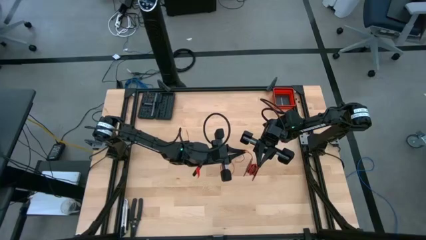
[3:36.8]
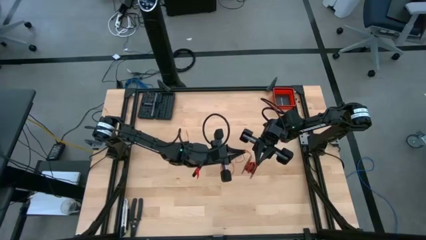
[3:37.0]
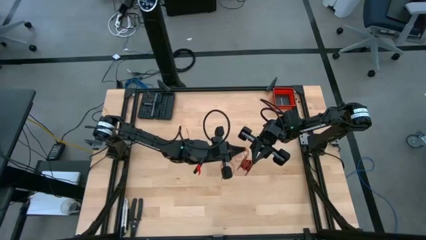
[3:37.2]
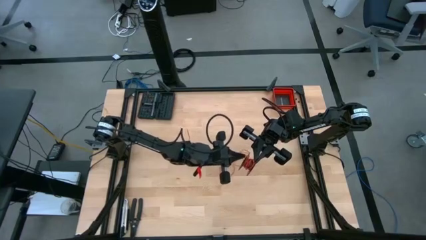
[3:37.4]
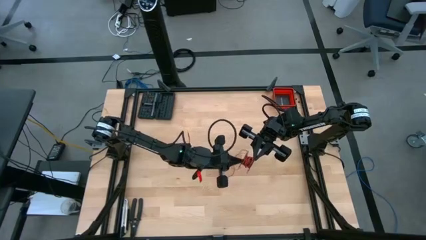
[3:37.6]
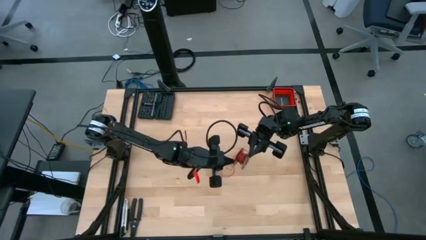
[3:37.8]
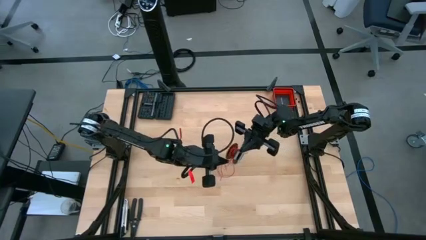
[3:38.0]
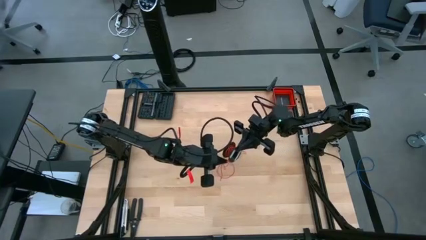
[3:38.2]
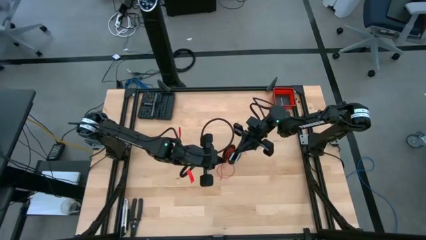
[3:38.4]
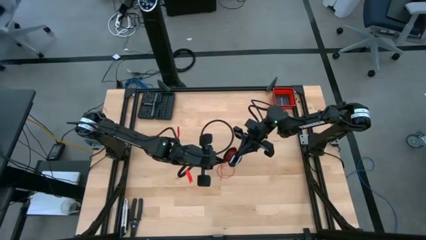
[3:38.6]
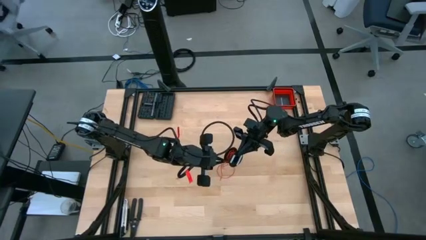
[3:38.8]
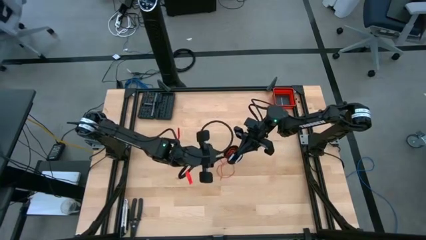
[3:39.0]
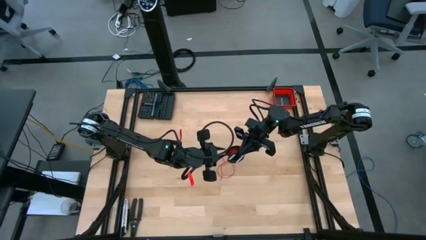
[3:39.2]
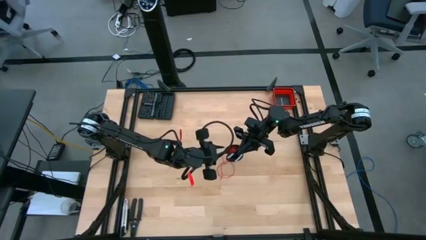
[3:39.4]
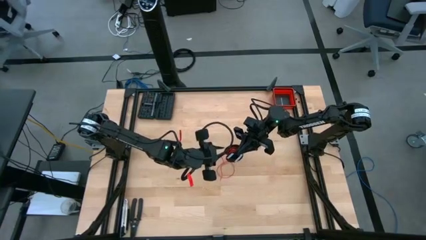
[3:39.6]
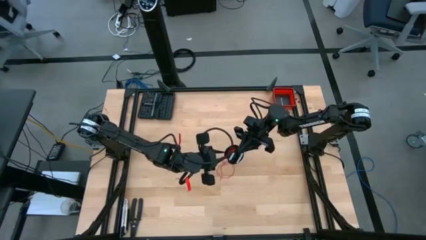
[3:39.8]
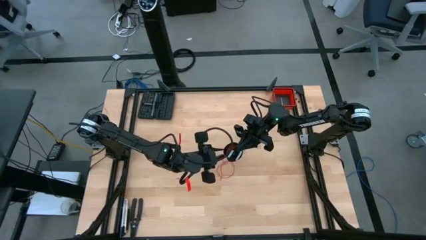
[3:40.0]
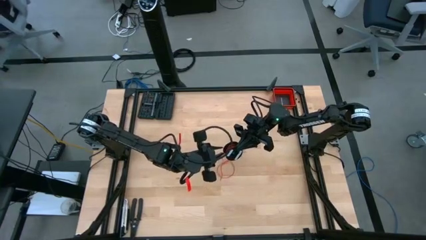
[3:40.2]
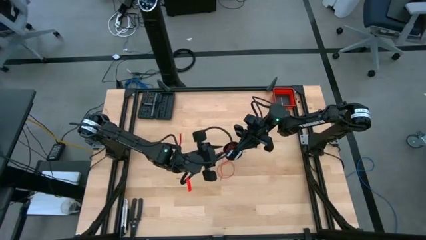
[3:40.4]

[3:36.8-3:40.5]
Task: Coil cords
Coil the red wire on the black spool

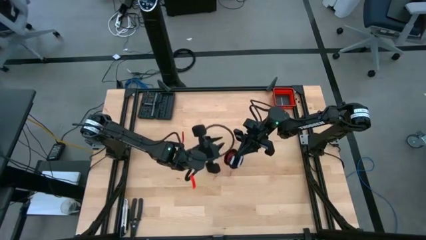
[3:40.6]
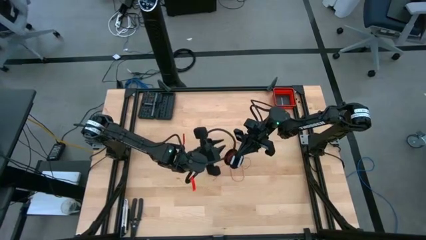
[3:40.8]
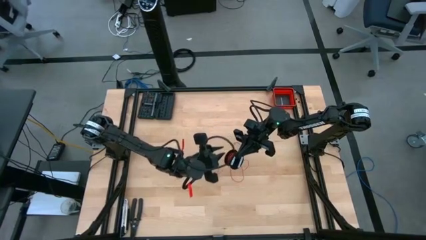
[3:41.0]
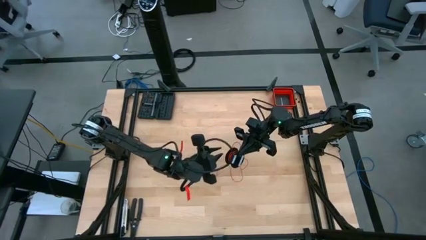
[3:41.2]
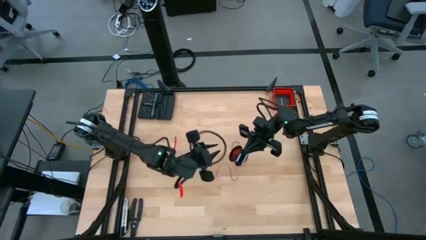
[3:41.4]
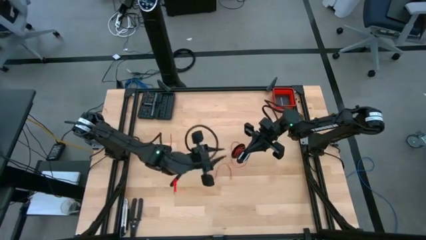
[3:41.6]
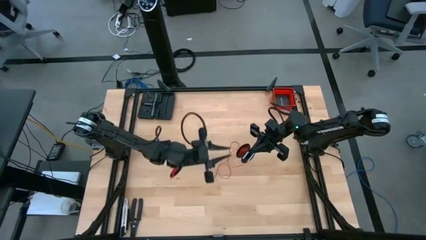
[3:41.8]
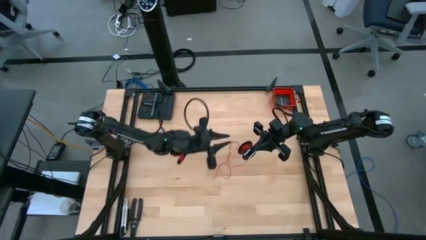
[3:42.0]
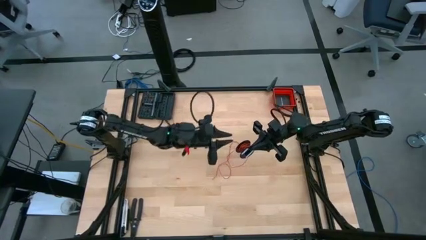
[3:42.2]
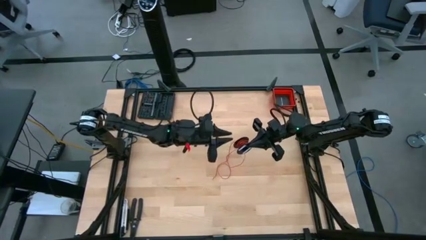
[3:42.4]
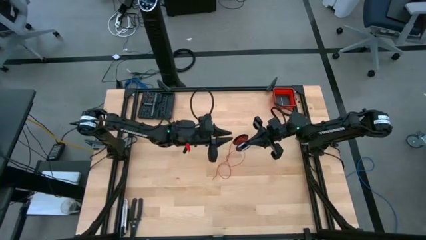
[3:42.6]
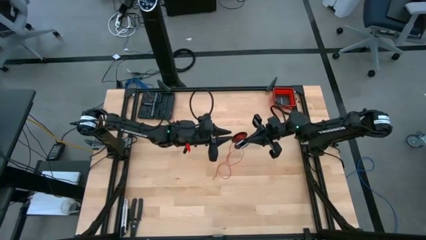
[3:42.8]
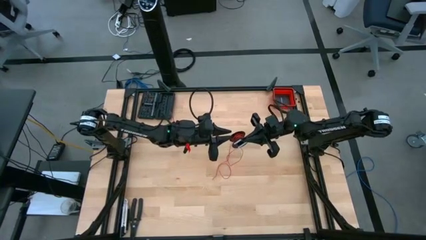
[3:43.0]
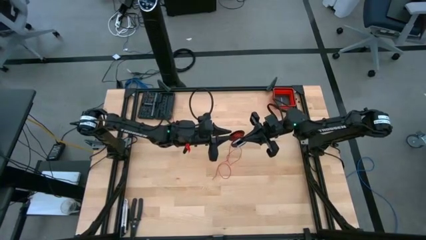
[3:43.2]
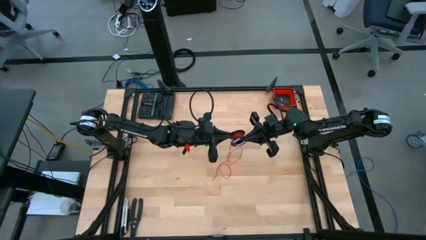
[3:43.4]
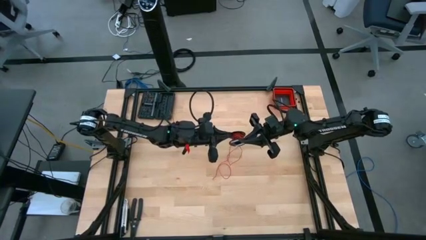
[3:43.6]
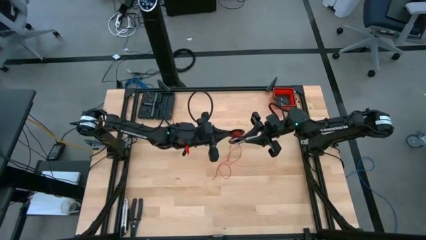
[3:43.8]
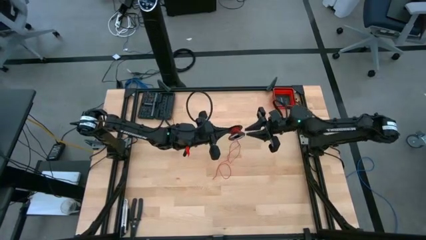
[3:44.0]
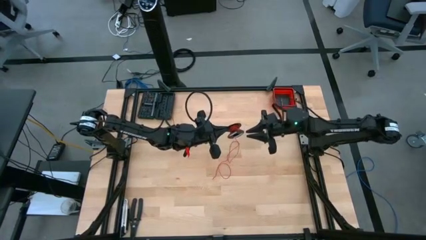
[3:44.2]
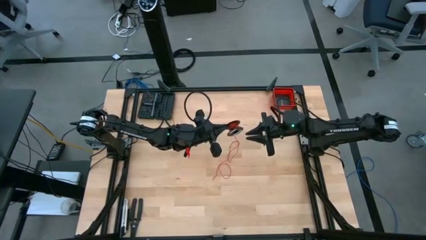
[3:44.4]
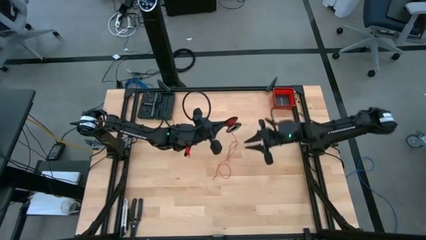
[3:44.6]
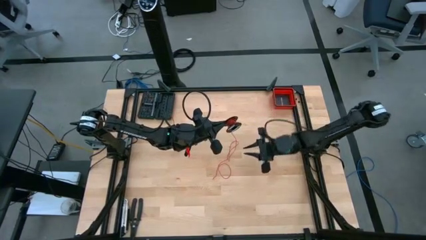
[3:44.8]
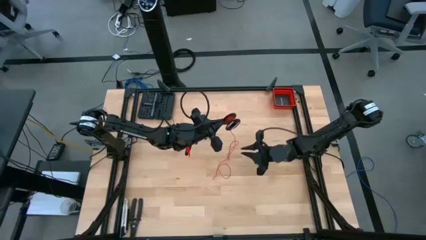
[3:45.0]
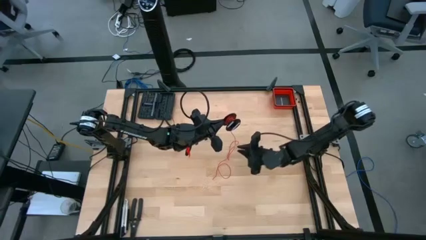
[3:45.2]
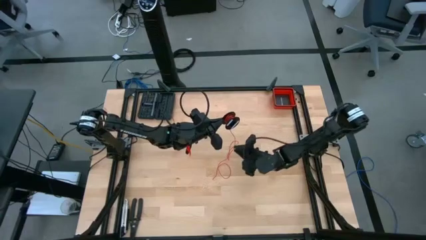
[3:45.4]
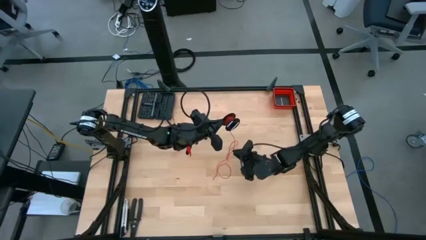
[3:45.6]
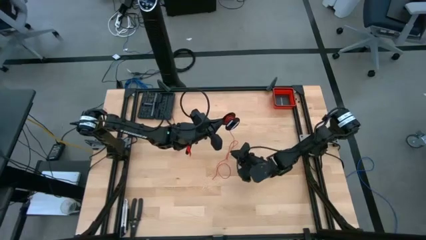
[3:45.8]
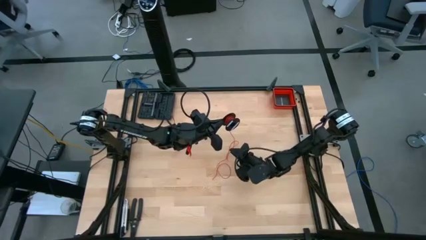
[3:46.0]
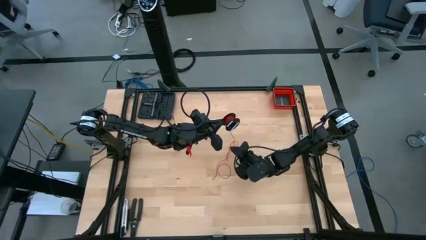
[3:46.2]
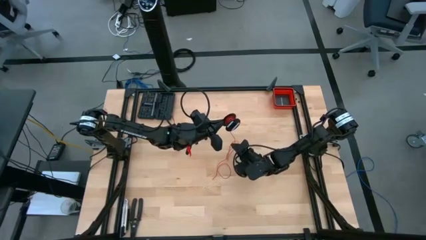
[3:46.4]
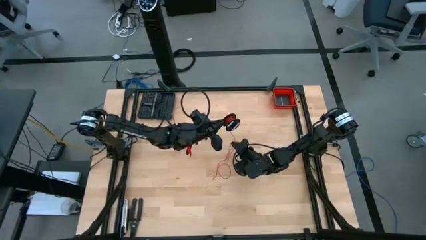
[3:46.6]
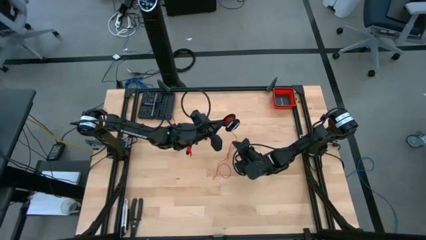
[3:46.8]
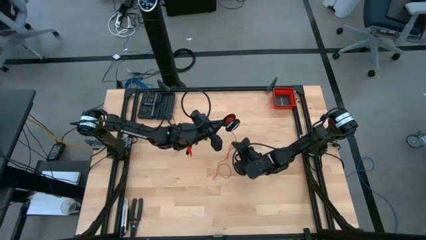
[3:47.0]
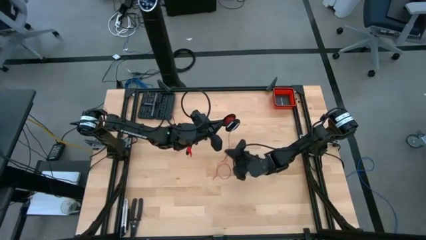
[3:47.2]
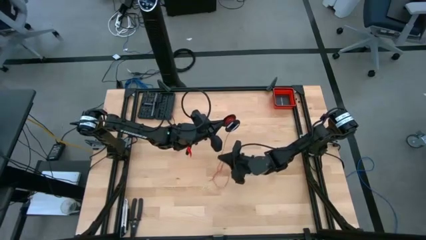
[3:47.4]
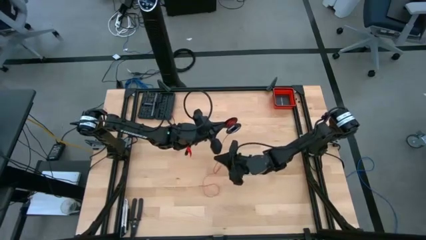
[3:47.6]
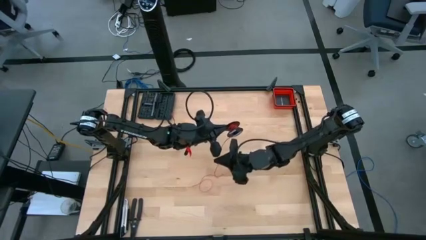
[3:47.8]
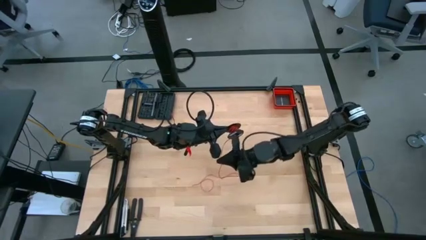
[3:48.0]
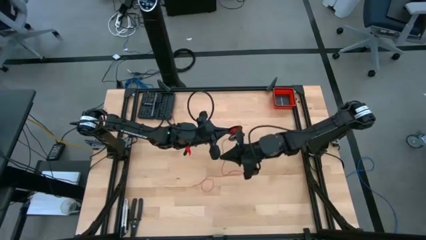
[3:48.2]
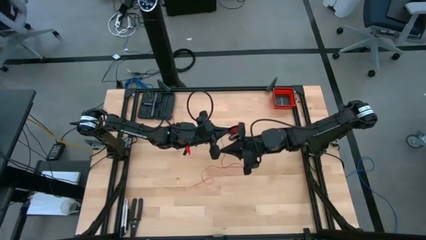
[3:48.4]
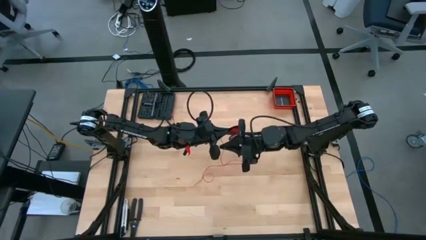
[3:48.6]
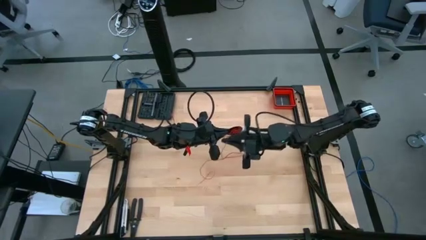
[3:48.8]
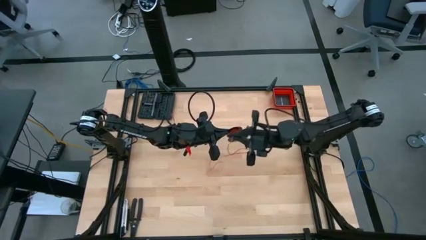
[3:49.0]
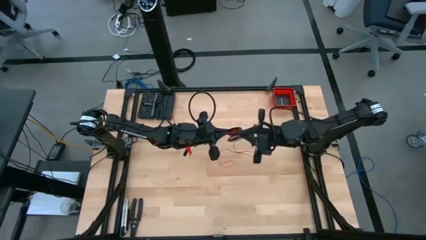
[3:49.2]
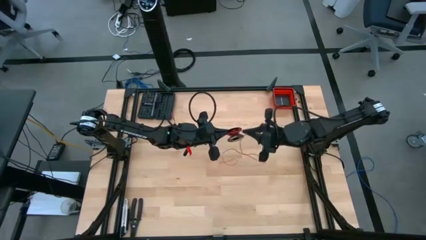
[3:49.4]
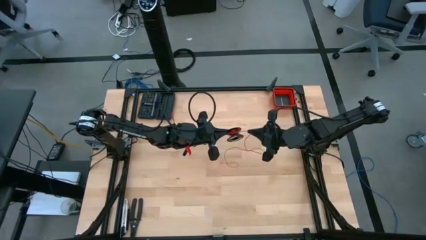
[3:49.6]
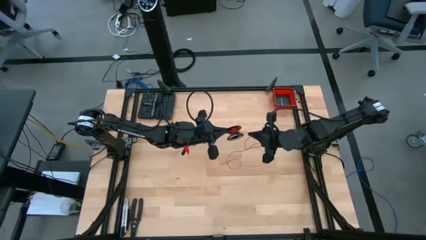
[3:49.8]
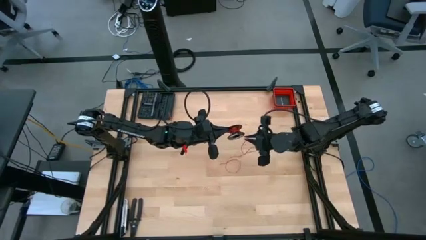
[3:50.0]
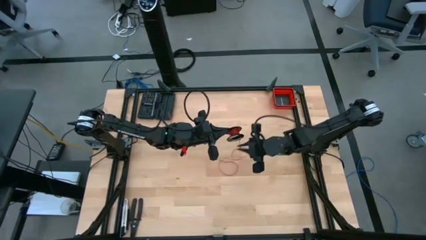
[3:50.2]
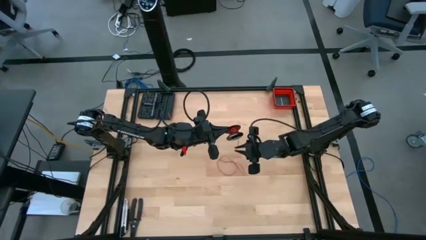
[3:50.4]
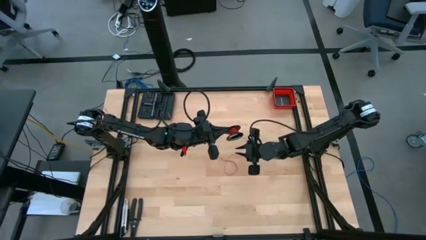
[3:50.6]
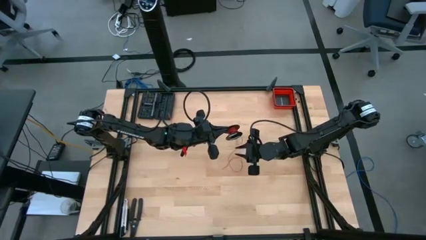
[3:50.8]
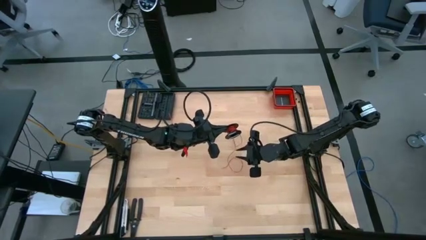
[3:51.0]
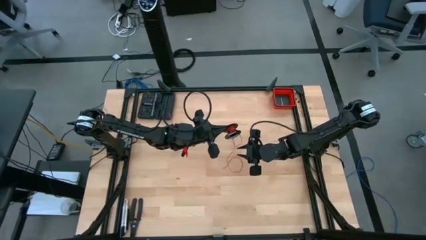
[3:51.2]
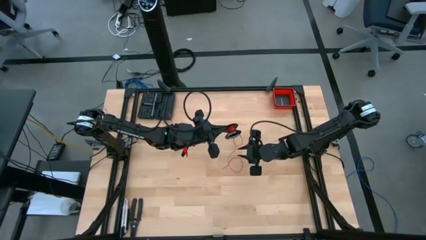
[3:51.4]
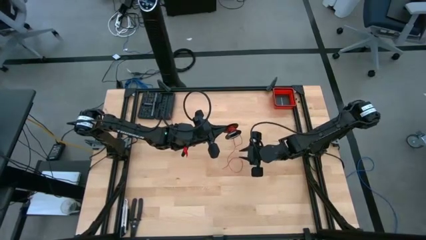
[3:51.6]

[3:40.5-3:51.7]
Coil the red wire on the black spool
